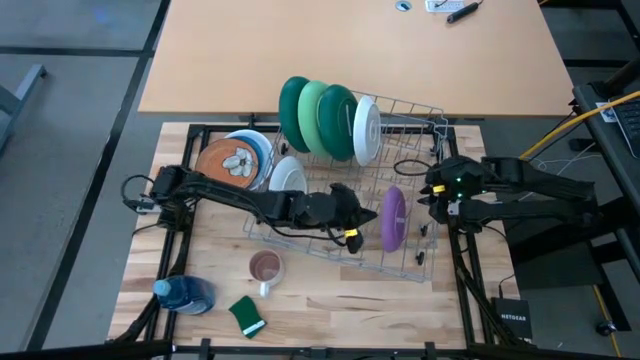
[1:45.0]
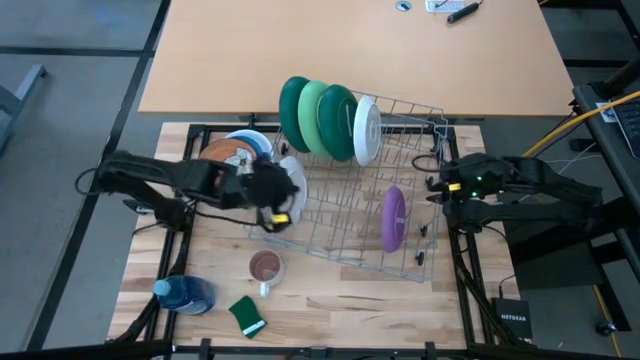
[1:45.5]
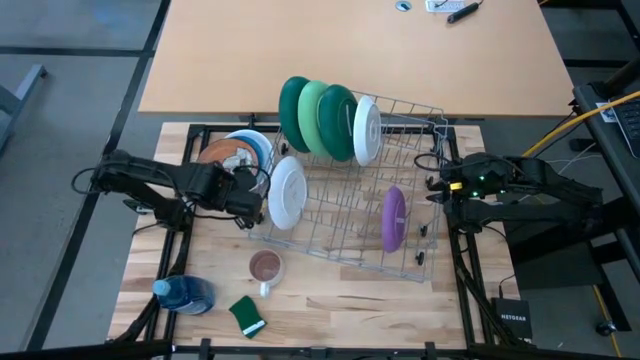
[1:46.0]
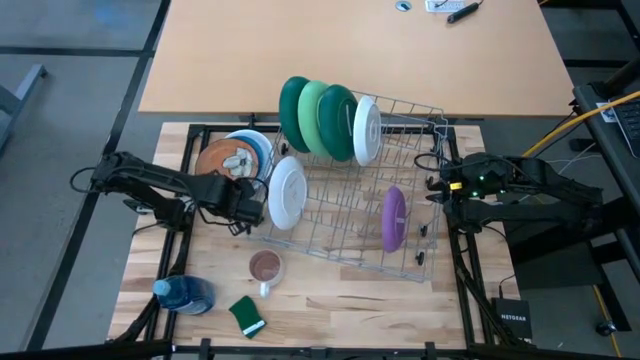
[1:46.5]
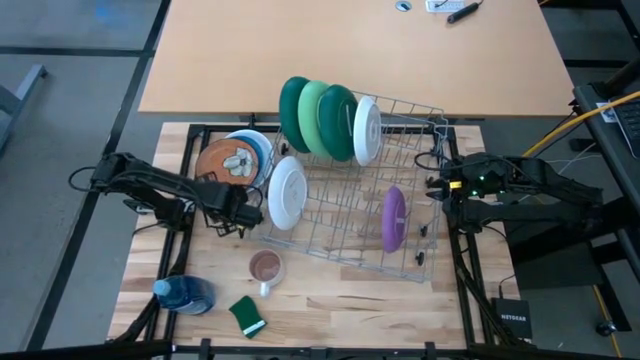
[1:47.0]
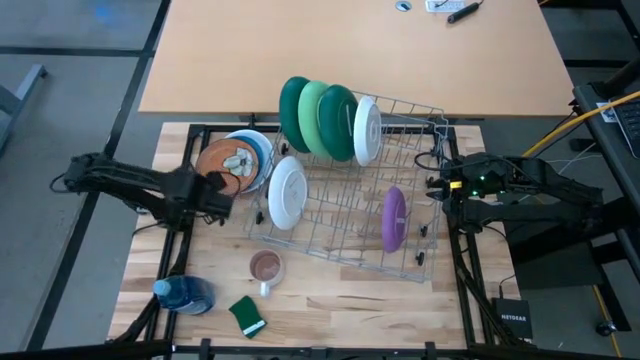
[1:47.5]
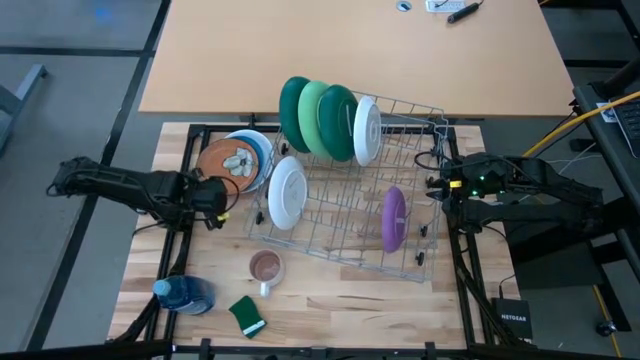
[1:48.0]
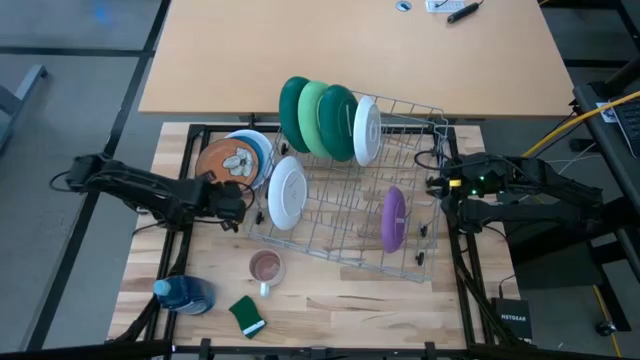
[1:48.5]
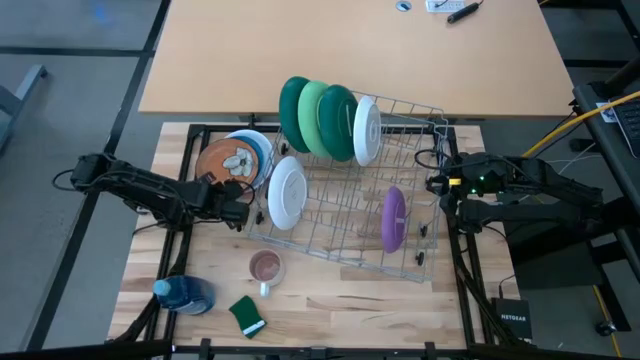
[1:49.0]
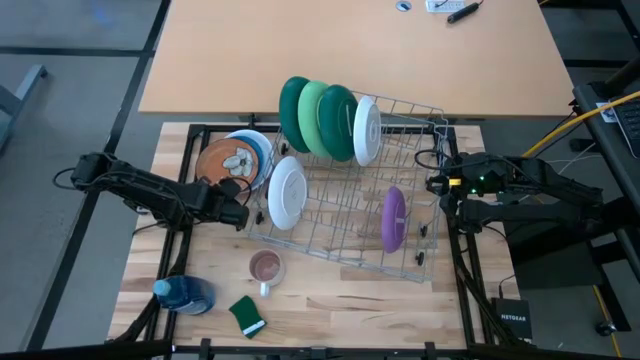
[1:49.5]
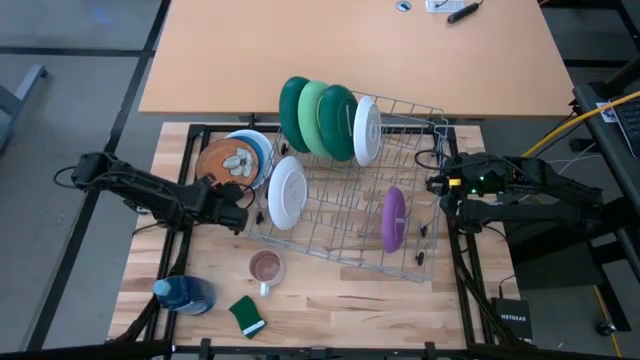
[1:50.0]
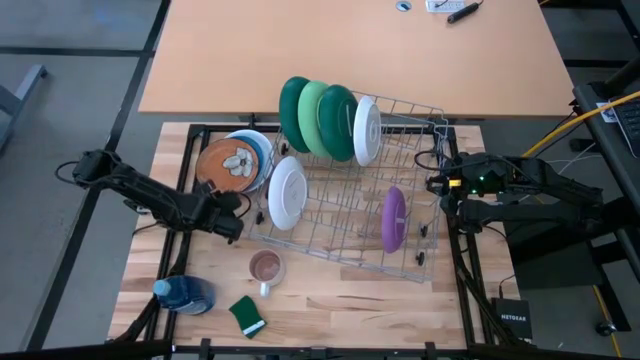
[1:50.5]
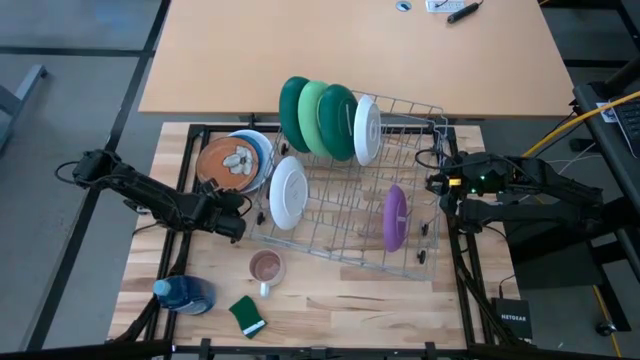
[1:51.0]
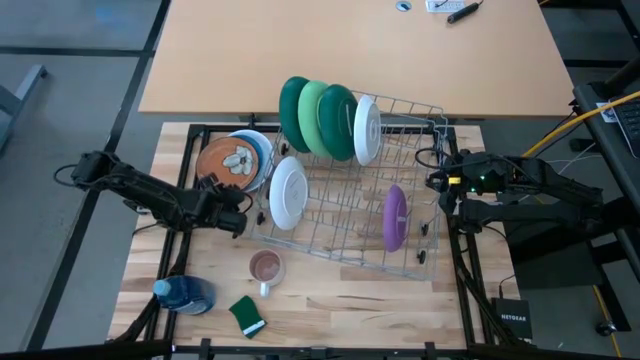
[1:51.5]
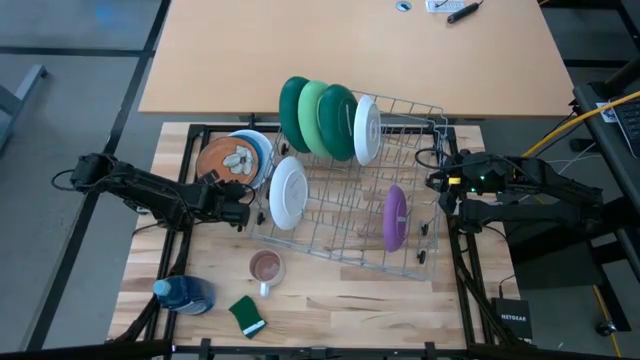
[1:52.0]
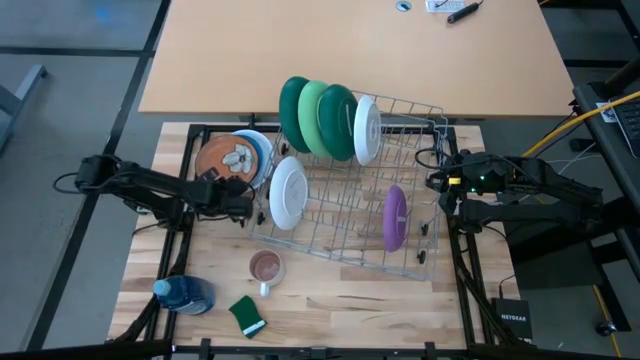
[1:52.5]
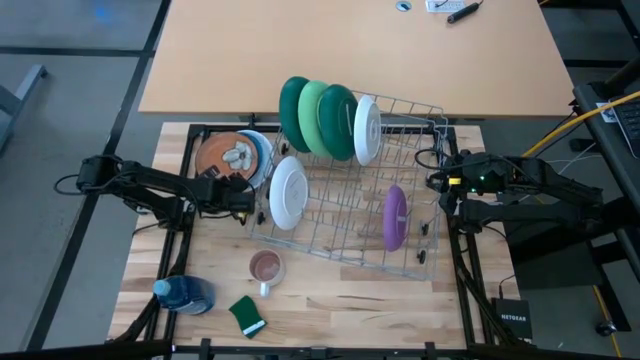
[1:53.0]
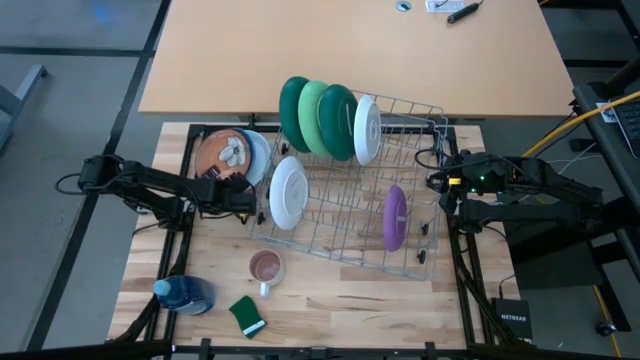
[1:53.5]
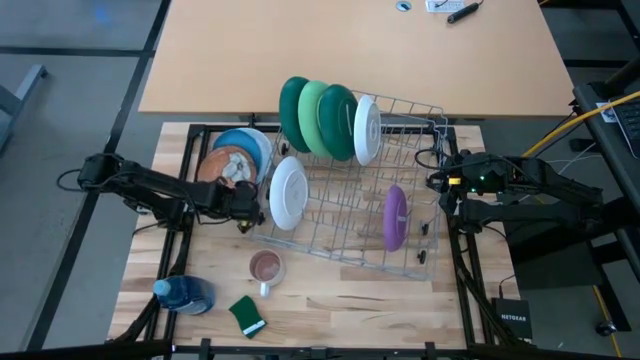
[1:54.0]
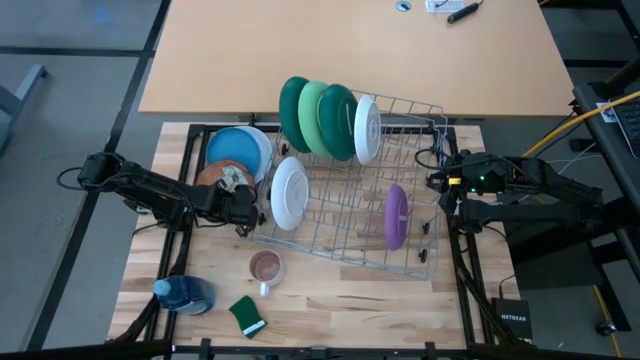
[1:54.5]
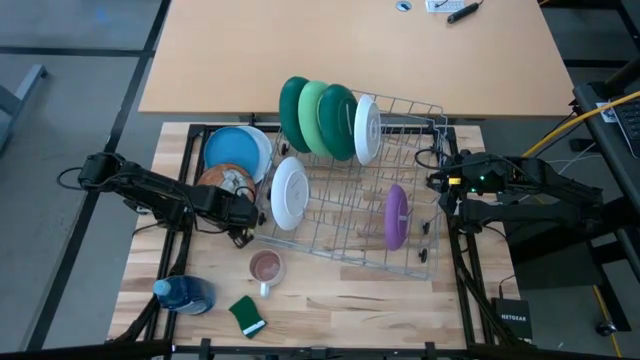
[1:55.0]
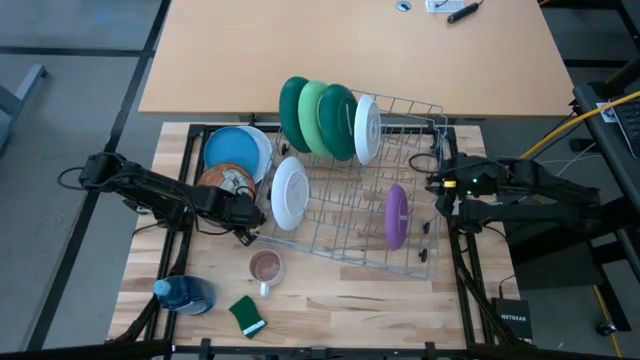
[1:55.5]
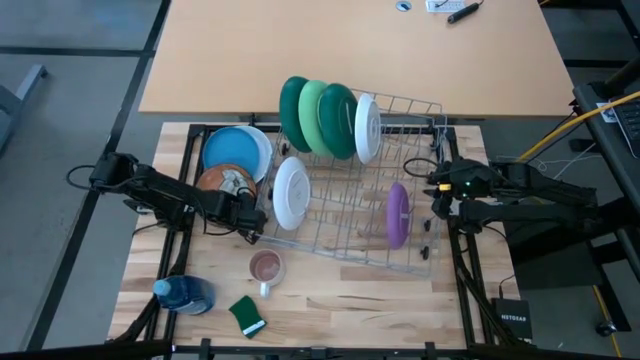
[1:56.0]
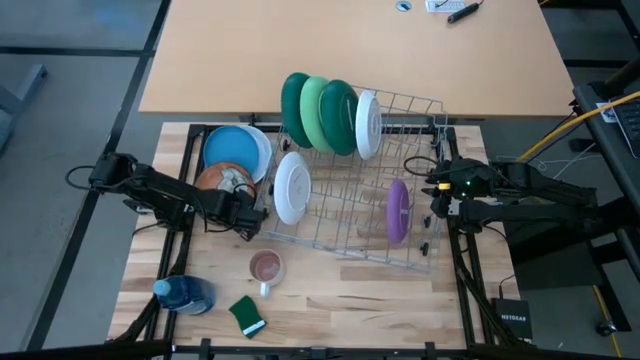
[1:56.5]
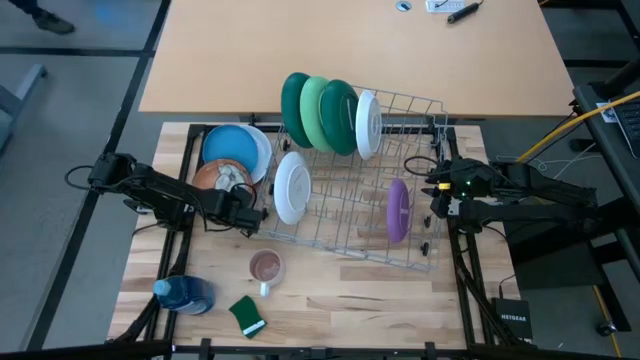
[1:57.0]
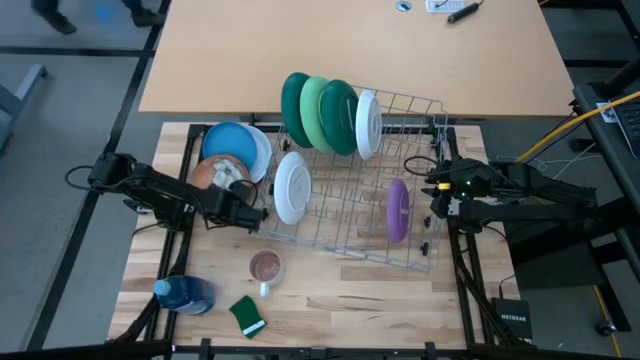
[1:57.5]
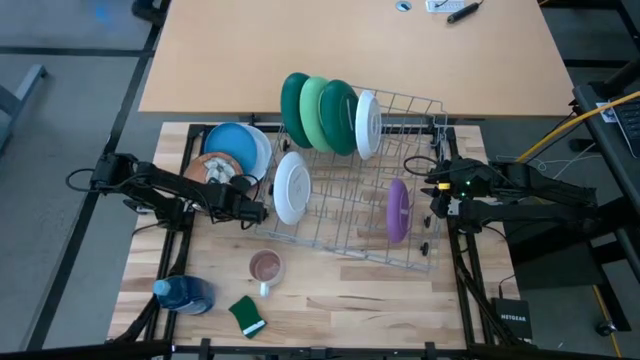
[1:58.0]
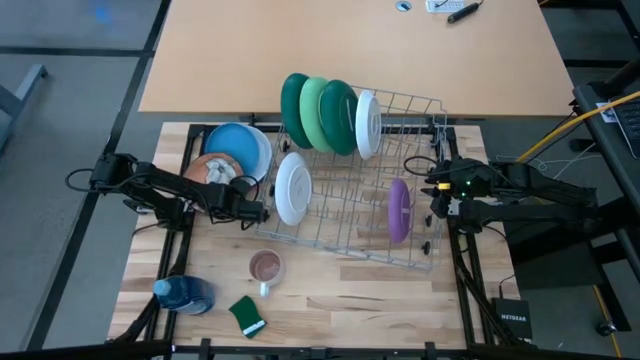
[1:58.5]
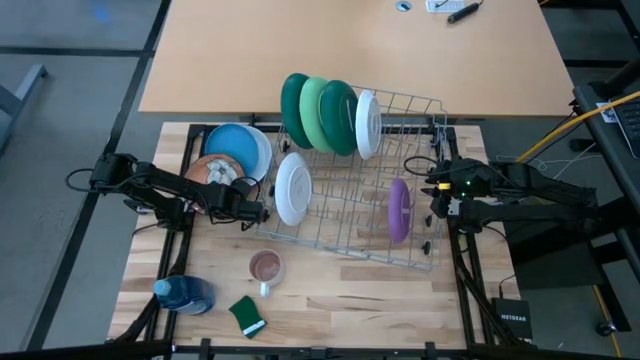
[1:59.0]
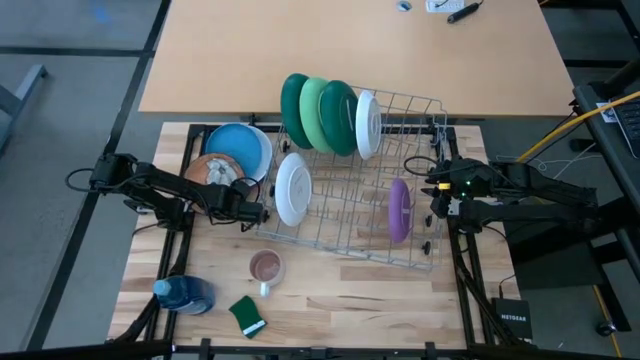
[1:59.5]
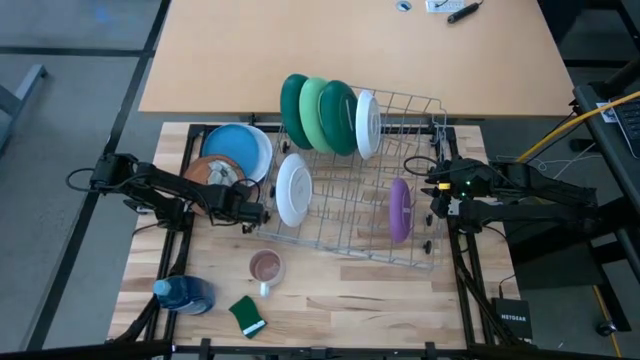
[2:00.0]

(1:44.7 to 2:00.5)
Task: Sort dishes
Put the orange plate into the dishwasher rack

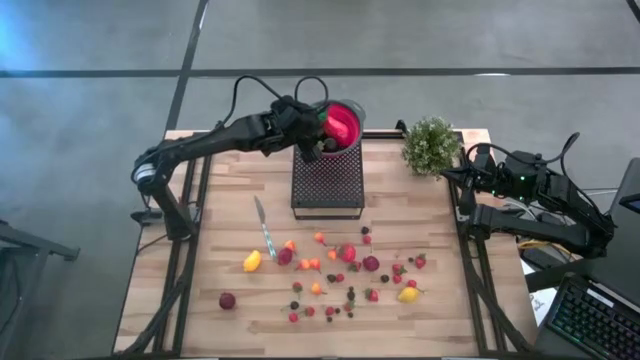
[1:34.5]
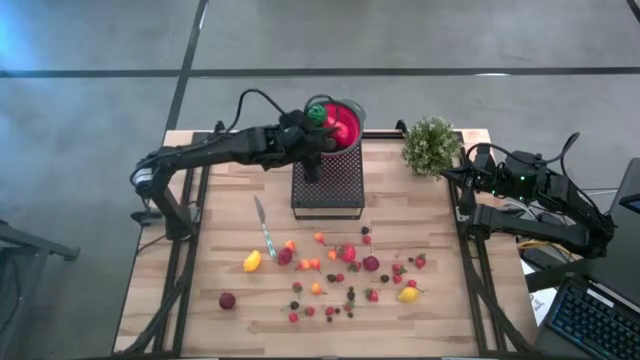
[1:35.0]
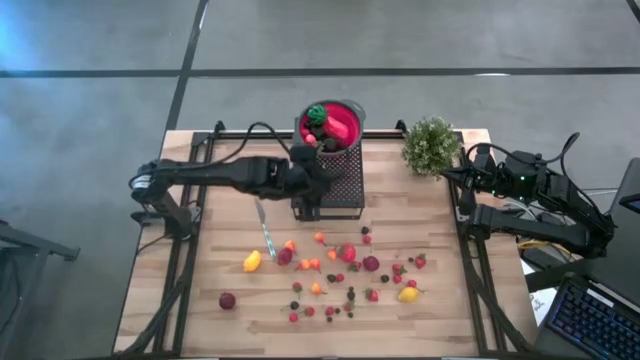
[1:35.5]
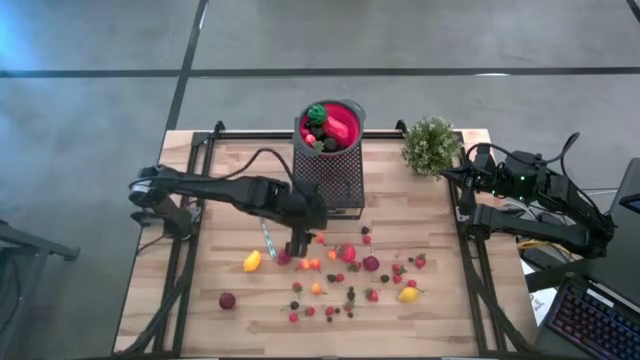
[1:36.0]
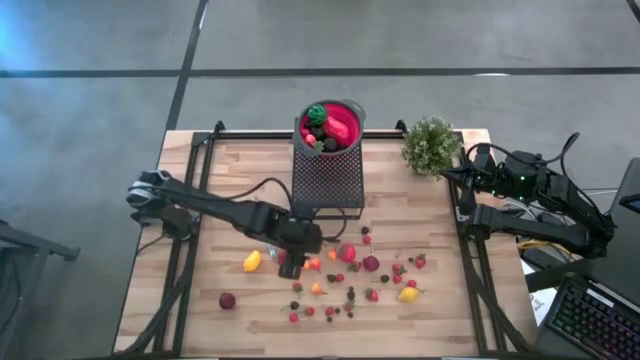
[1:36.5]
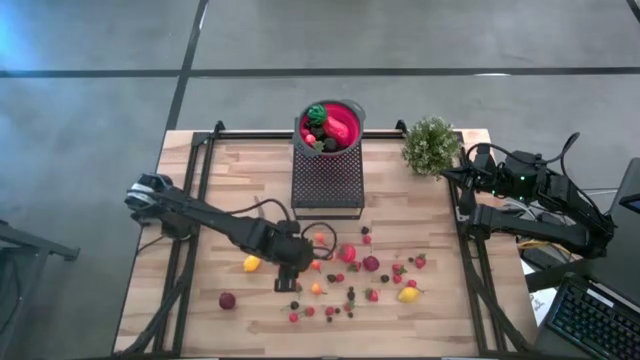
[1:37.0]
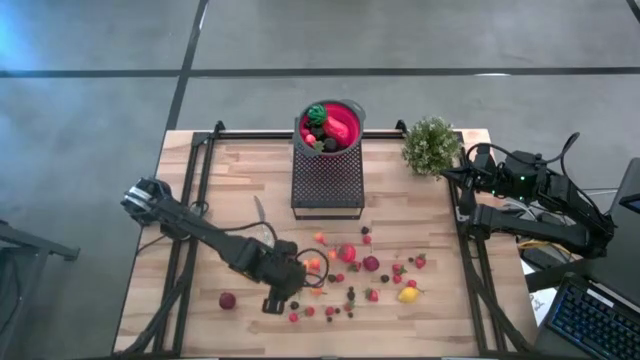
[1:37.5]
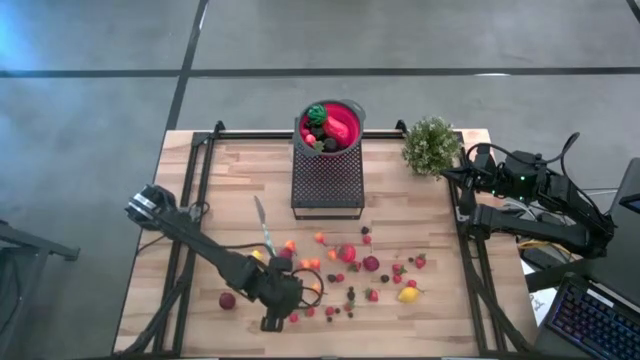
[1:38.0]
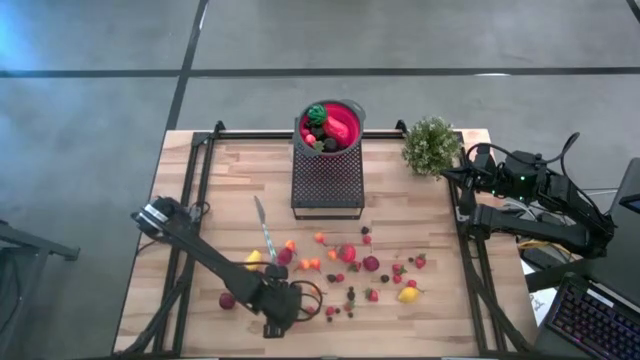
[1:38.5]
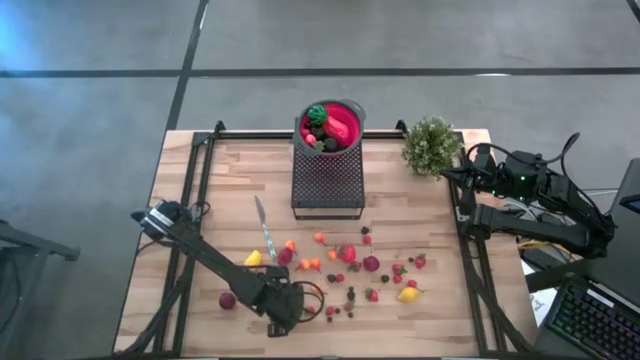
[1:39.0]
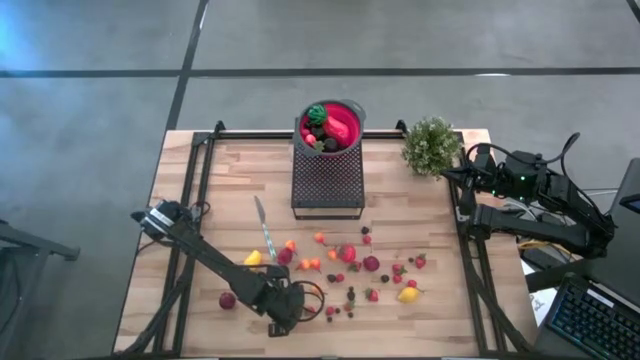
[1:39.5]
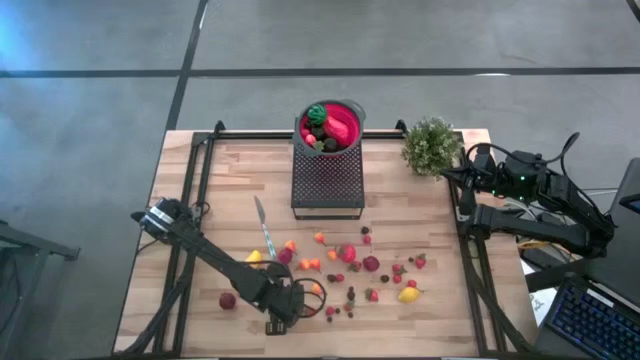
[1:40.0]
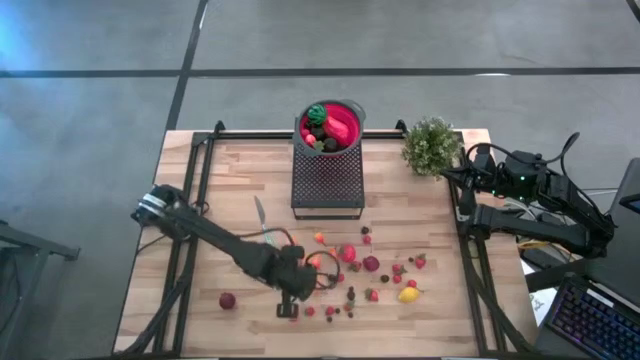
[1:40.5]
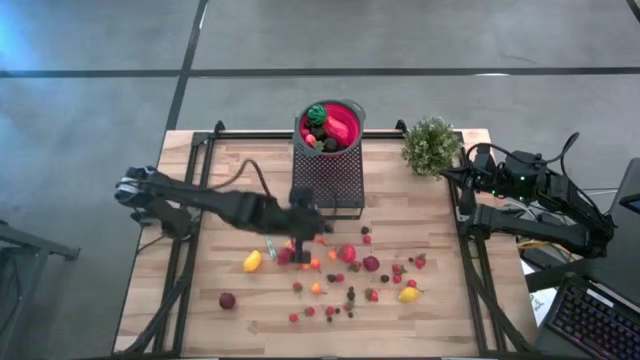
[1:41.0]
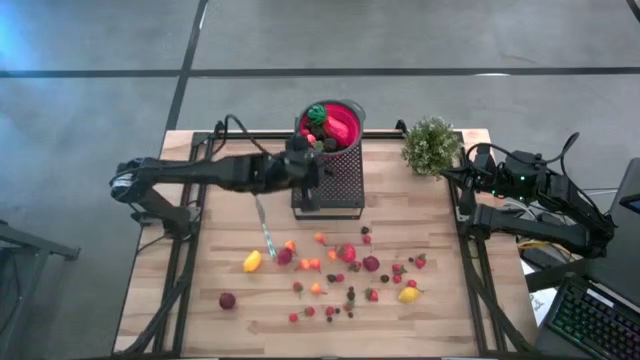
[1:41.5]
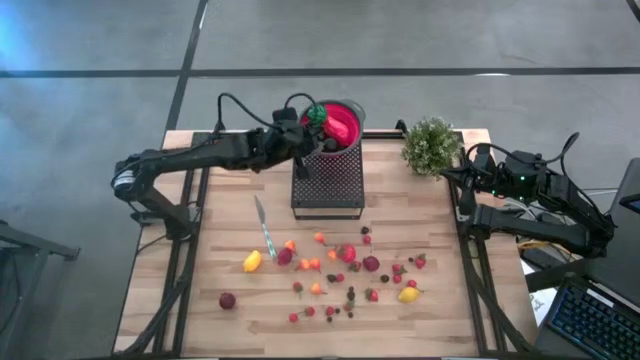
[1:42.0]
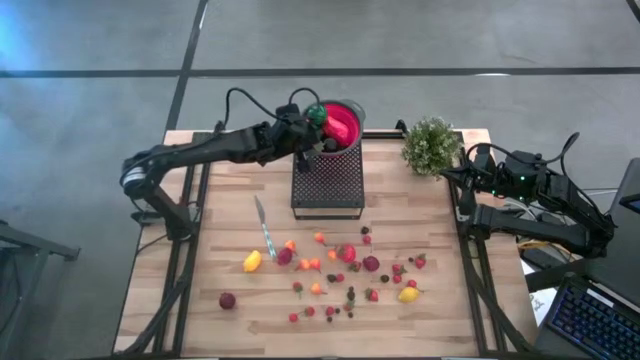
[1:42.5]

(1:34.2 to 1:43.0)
Task: Pick & Place Fruit
Put the bottom left black cherry into the strainer bowl on the shelf
